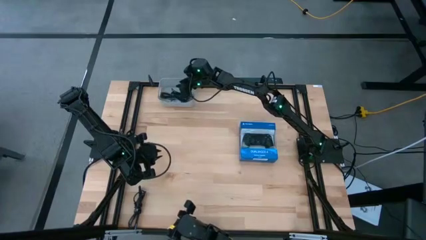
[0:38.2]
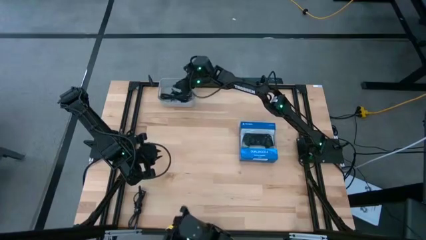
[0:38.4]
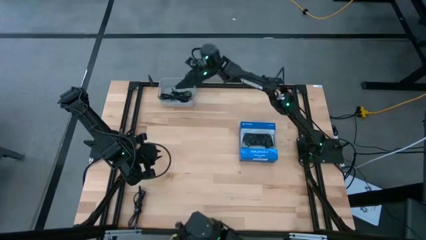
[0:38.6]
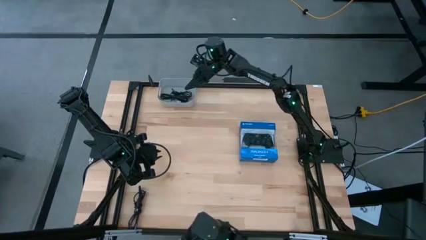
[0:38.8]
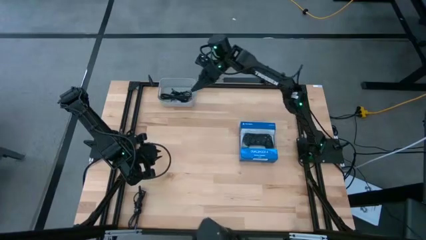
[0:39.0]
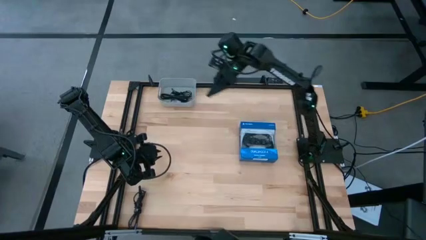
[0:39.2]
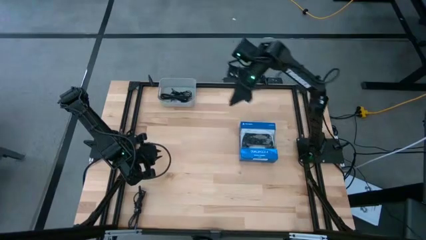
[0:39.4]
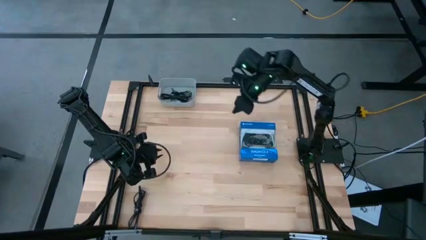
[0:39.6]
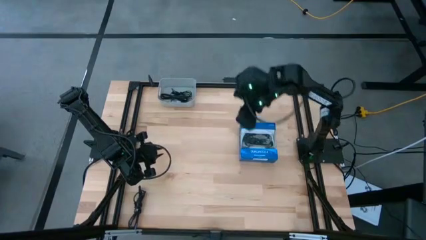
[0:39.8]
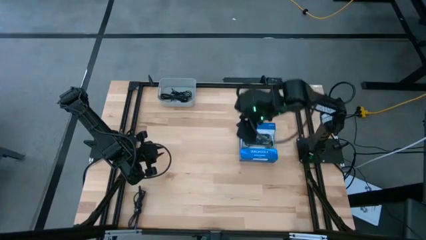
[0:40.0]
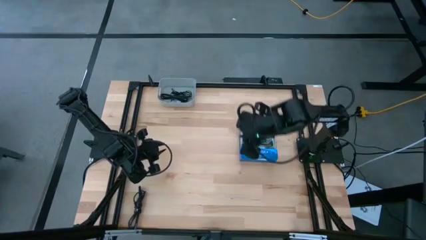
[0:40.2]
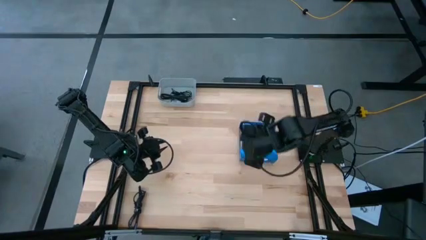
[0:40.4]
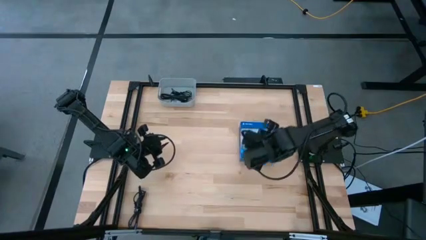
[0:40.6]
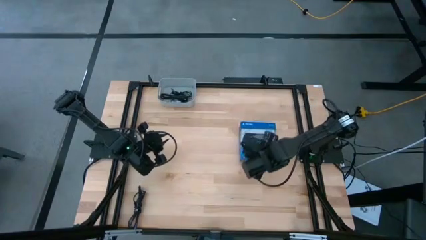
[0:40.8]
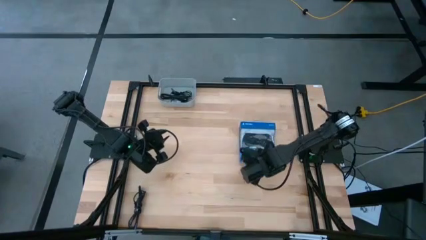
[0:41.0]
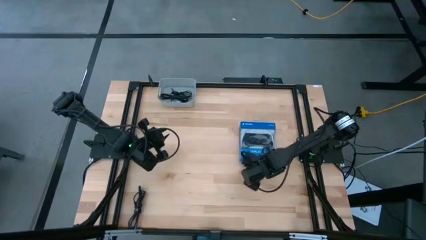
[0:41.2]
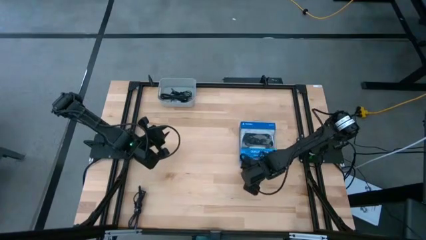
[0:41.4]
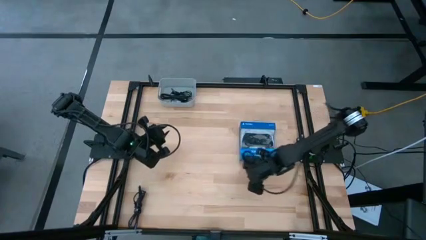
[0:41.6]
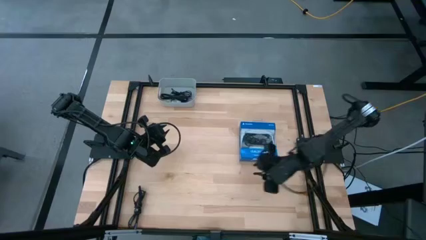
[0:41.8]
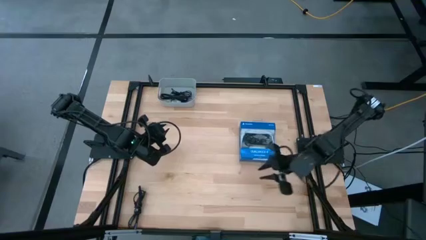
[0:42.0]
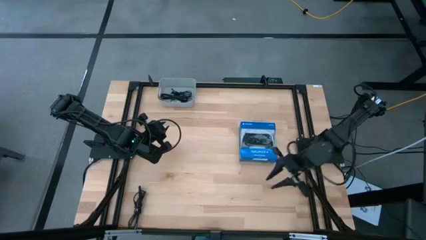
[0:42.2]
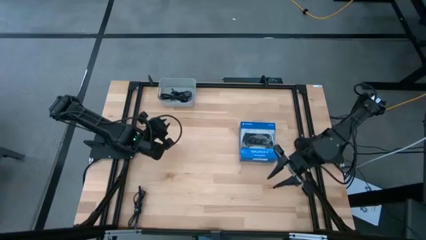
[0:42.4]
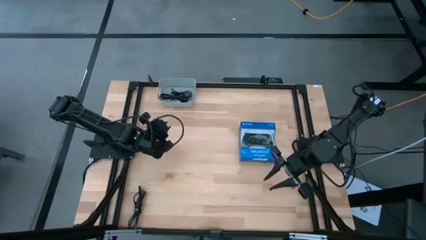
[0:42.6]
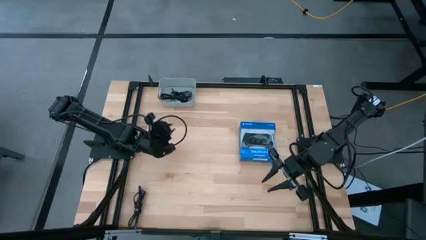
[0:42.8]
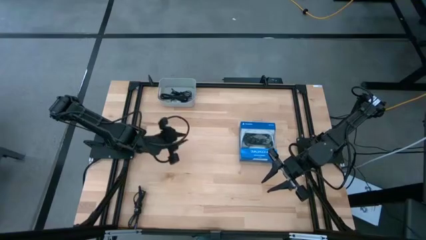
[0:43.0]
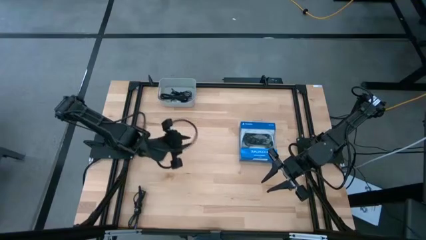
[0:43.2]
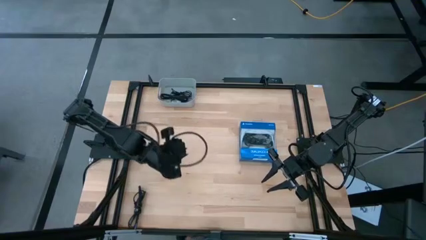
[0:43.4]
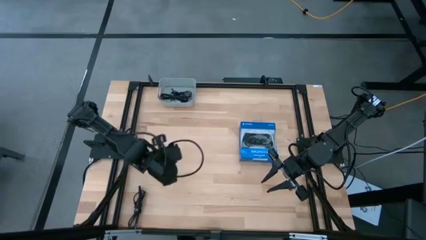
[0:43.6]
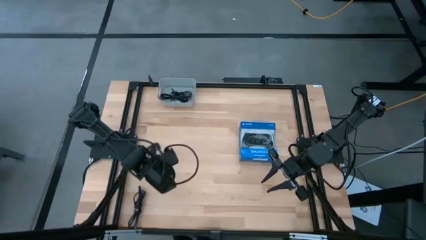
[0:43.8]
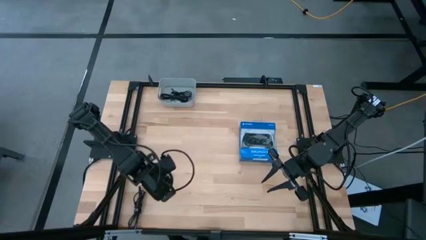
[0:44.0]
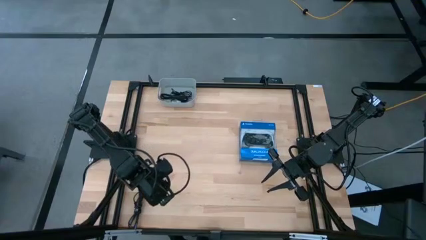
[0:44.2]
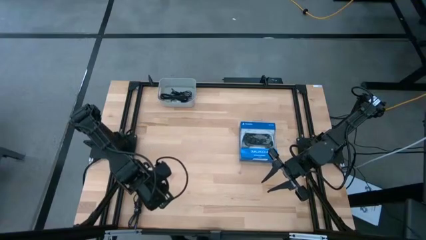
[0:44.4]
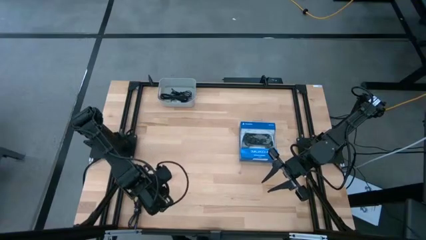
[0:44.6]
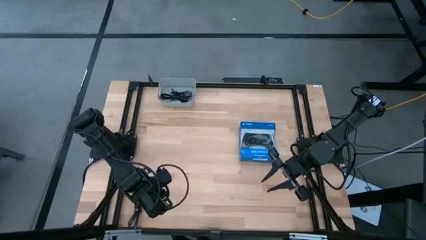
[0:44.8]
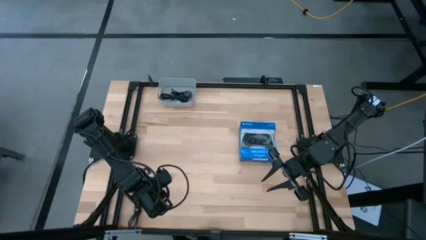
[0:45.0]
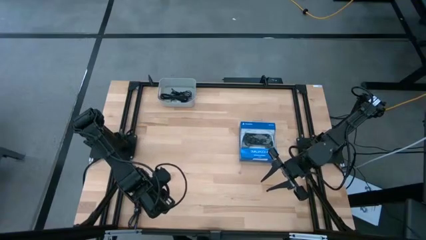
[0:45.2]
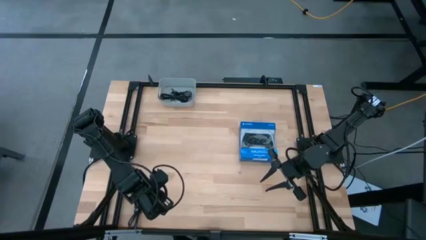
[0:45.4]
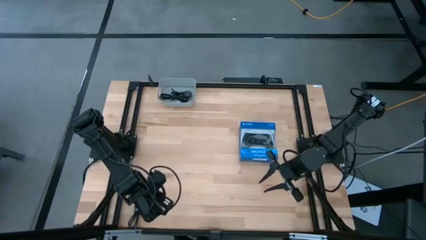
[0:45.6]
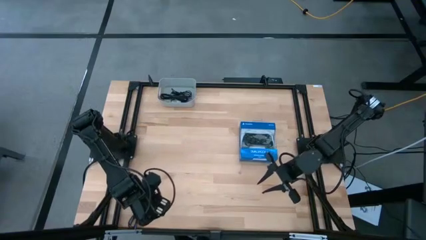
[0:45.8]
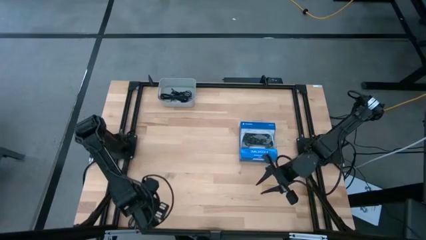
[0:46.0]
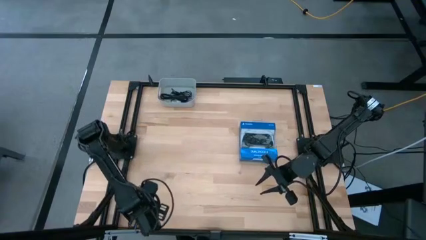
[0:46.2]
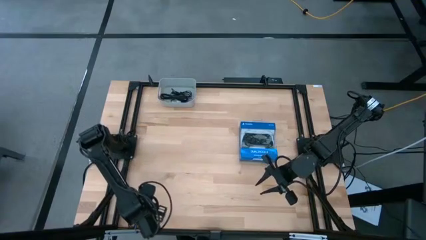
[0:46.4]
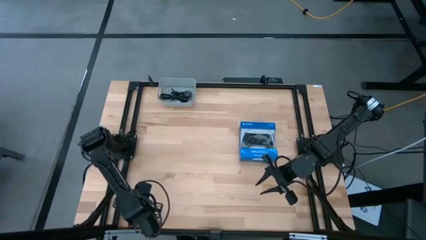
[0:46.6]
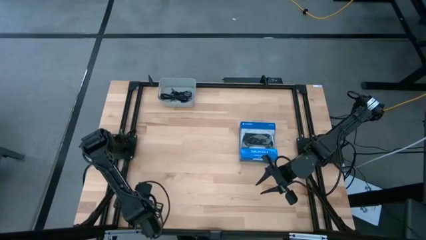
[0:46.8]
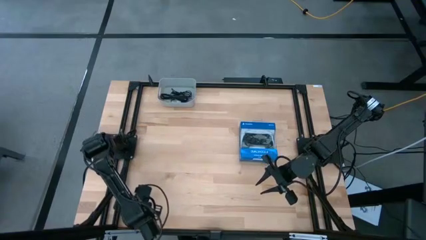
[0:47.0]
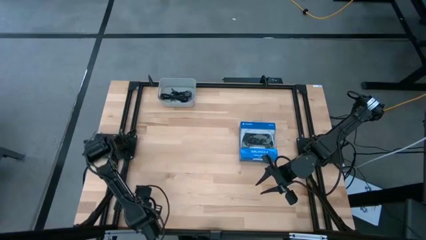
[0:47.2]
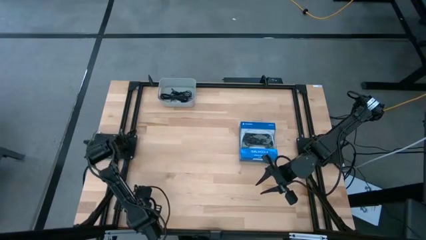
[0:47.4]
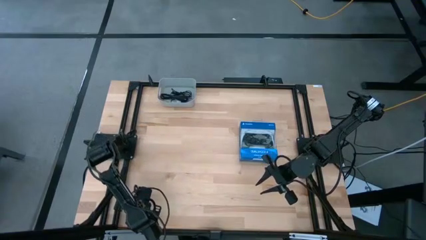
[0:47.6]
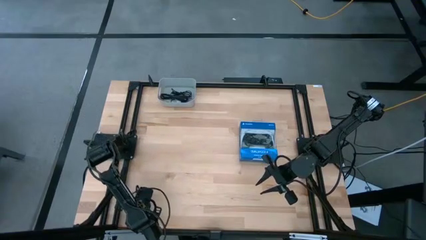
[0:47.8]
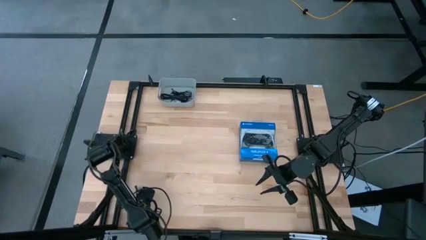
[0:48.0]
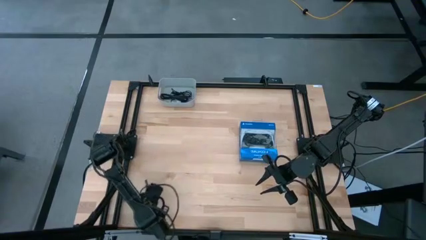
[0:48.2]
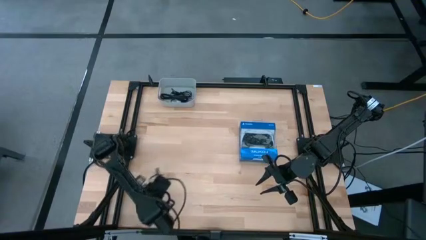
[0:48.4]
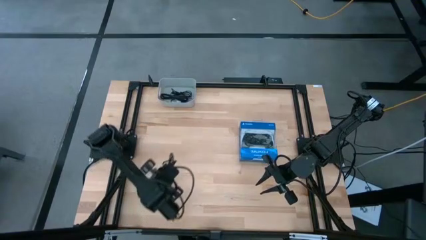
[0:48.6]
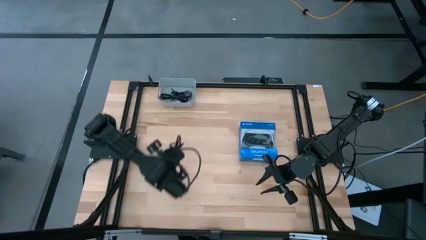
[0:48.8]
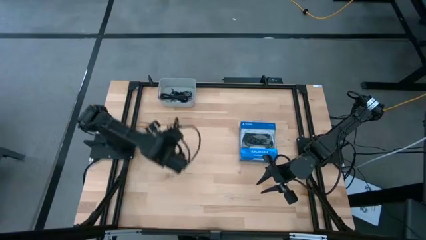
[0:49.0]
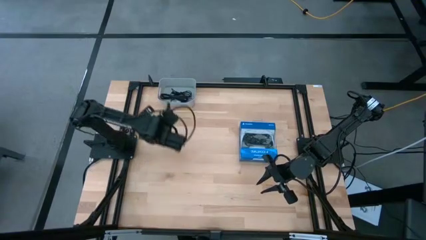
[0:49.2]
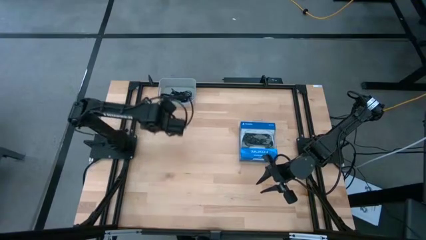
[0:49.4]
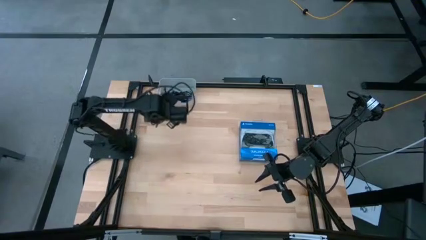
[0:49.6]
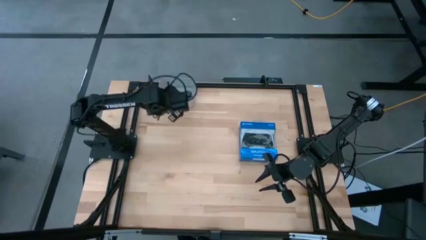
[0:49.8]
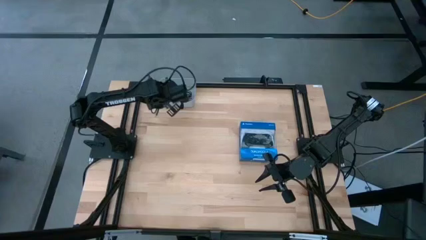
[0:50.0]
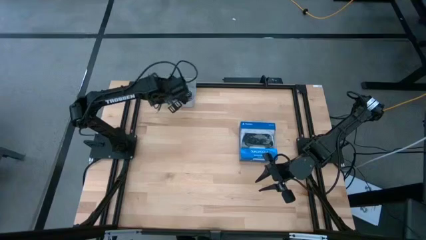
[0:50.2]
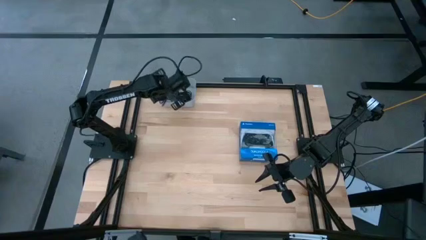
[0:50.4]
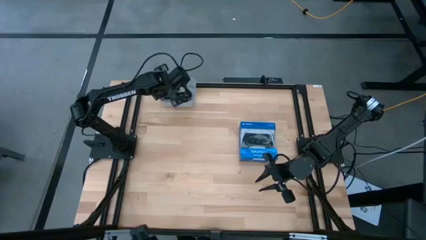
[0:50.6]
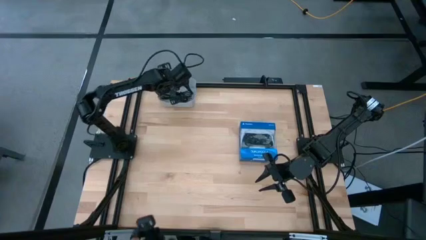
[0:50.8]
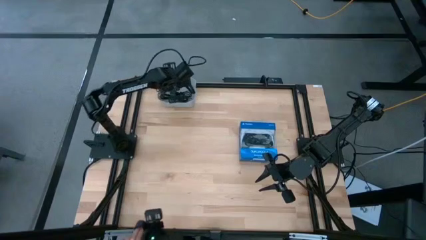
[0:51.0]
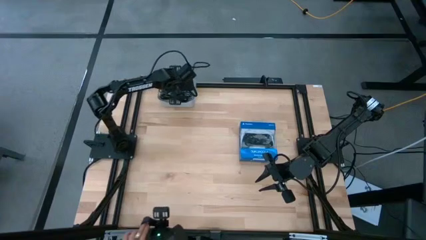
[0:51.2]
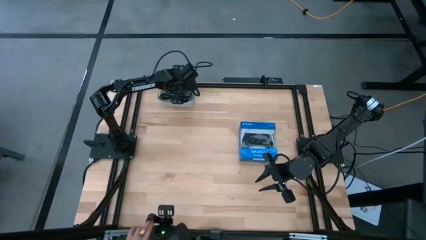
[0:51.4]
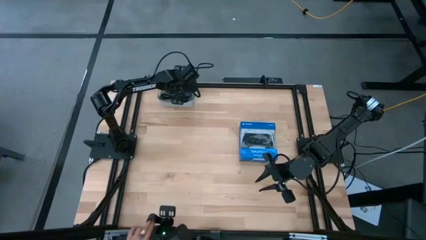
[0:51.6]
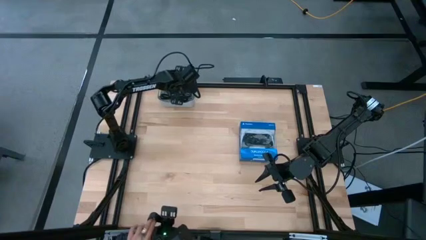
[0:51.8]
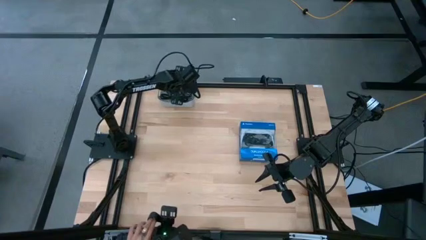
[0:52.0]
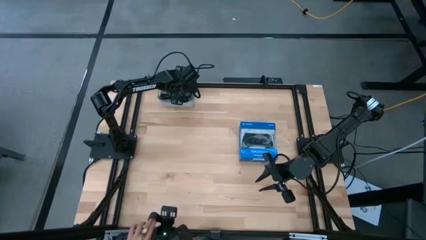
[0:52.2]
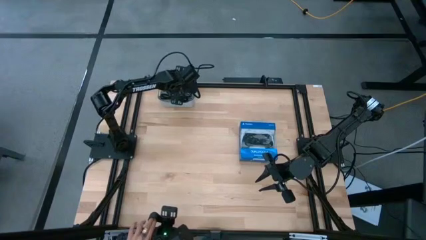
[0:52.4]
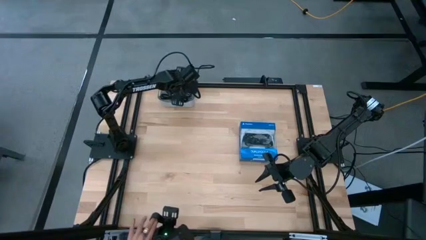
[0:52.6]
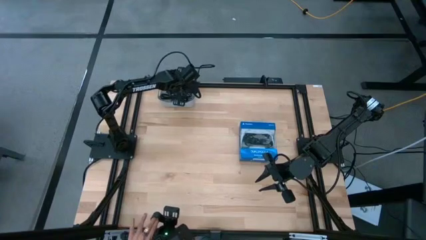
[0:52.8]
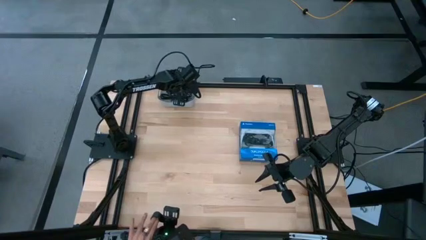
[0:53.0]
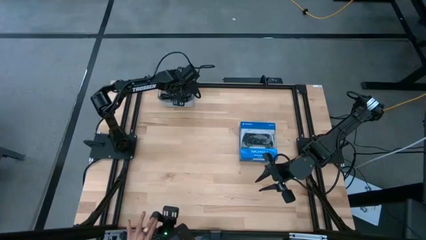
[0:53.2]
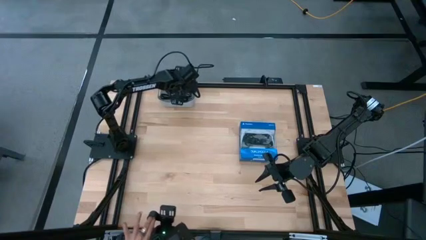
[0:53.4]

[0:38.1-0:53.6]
Task: Pick and place USB-C Cables
Put the black white charger cable into the gray bin
